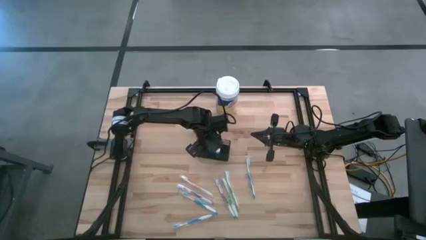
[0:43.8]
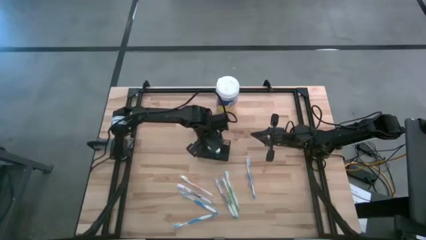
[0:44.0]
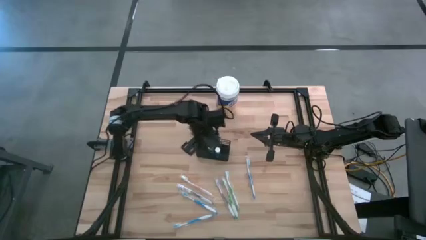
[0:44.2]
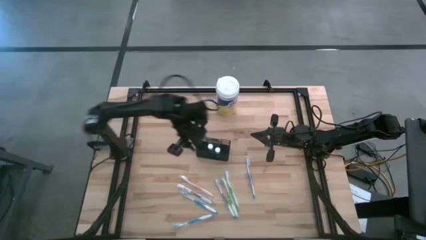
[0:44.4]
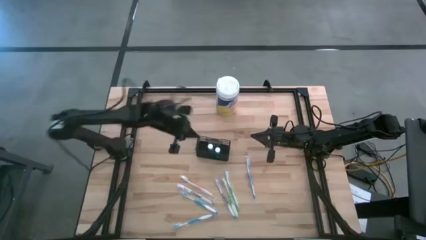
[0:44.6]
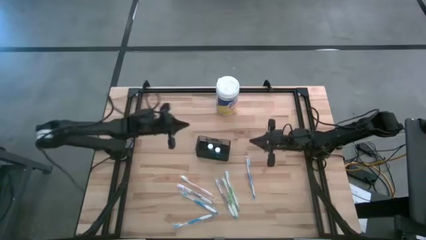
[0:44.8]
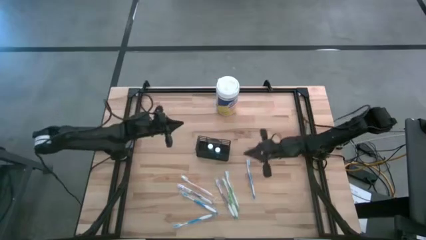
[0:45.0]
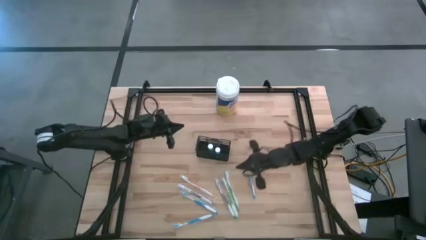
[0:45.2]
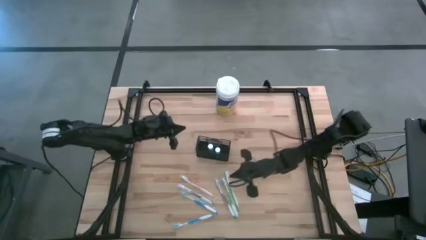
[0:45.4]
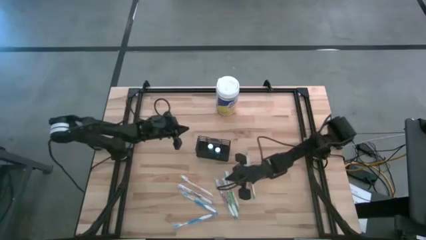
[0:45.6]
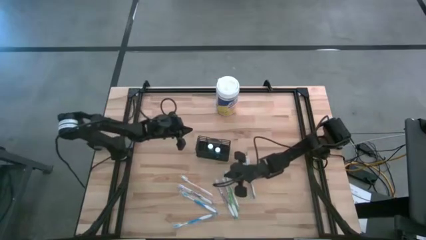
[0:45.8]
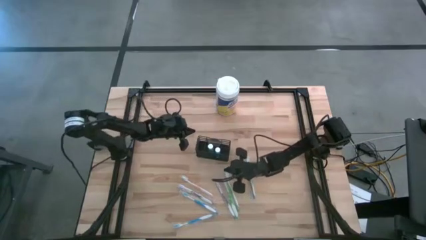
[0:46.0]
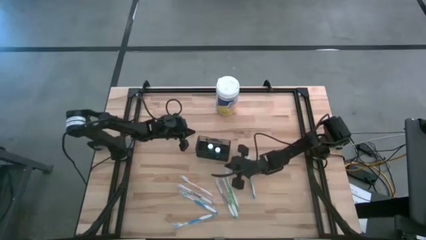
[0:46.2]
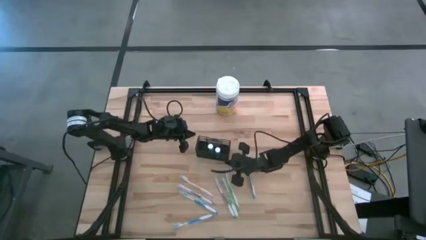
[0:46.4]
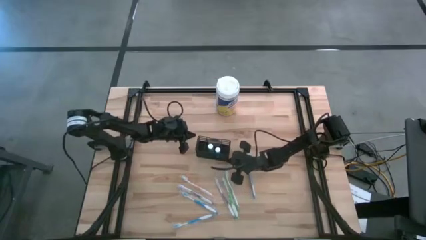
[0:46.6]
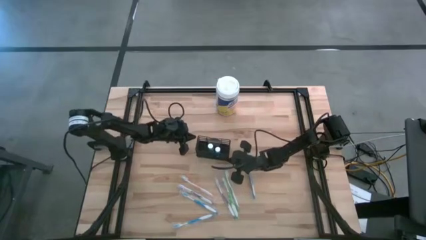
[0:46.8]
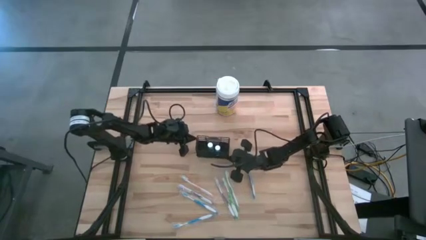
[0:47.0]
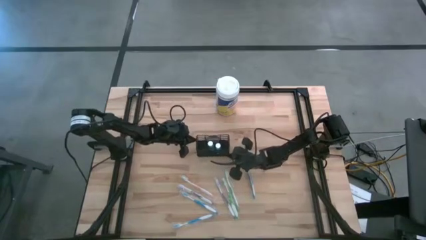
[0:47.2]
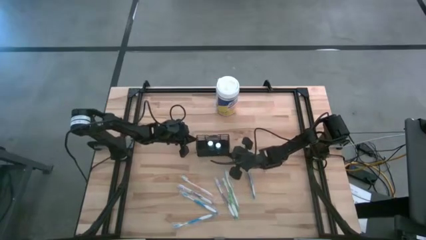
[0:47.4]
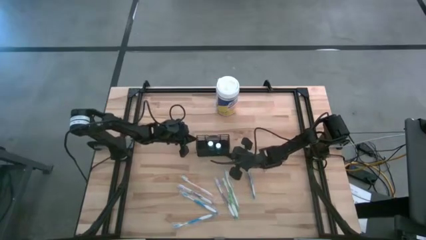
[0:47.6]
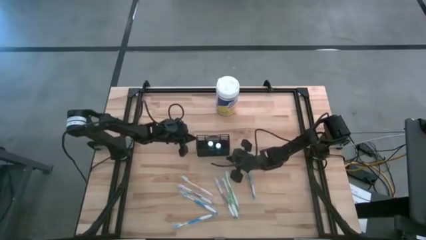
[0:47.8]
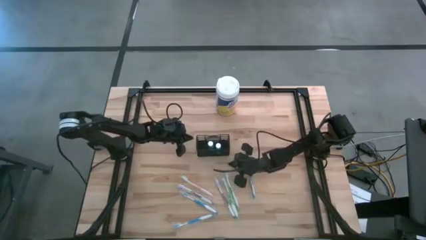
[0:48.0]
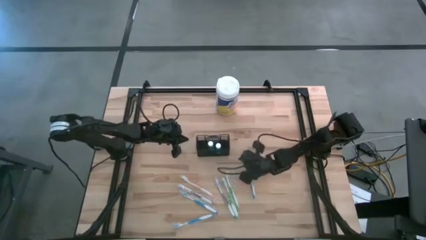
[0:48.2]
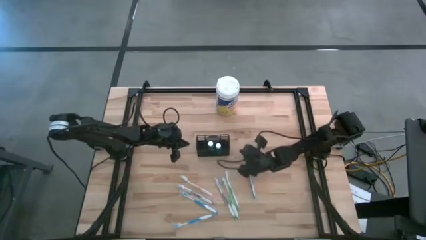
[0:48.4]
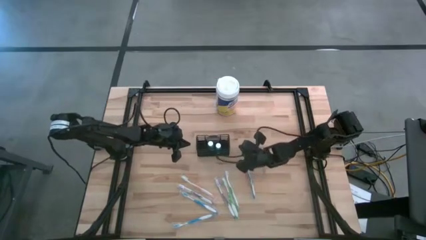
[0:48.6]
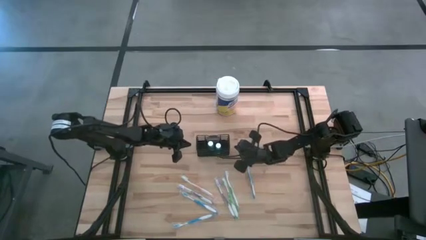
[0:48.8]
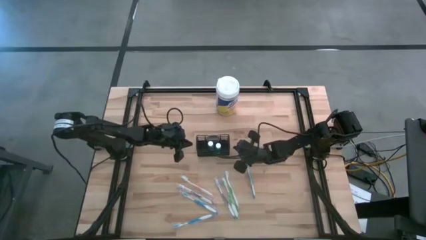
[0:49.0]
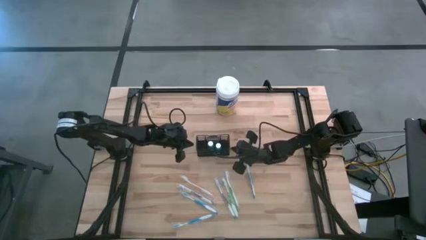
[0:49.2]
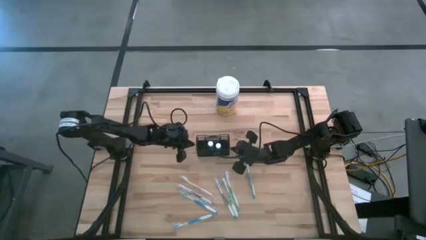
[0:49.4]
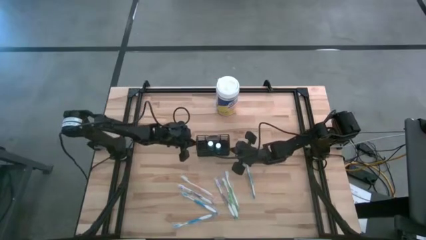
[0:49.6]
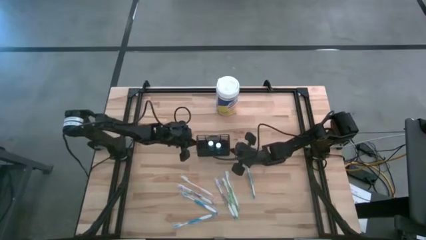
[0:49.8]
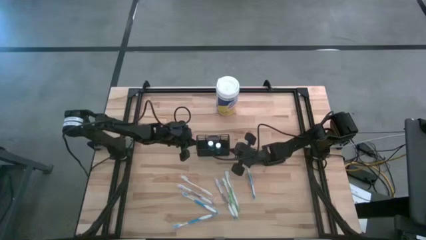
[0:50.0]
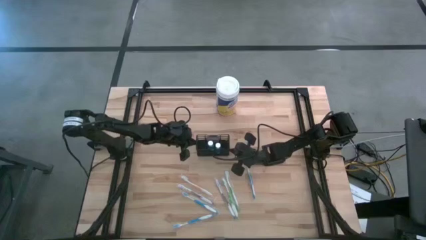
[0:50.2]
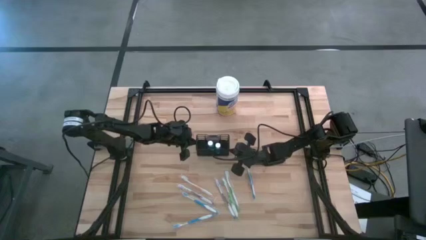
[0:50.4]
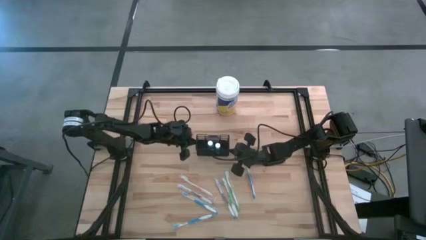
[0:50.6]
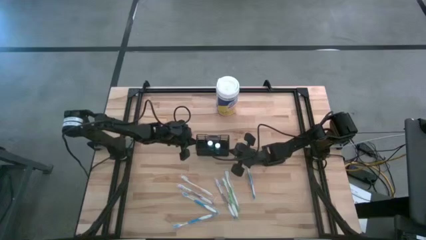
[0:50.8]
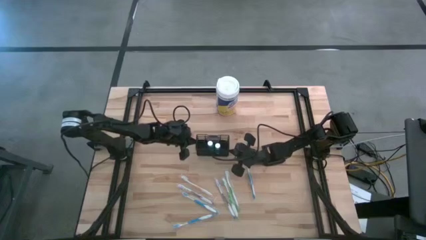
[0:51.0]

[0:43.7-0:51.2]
Task: Pick & Place toothbrushing station
Adjust the black wire organizer

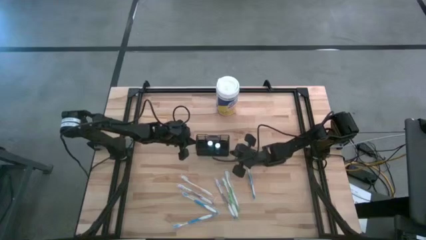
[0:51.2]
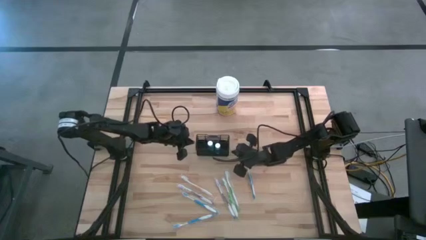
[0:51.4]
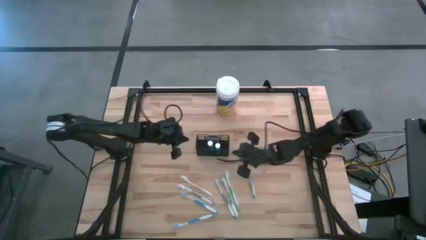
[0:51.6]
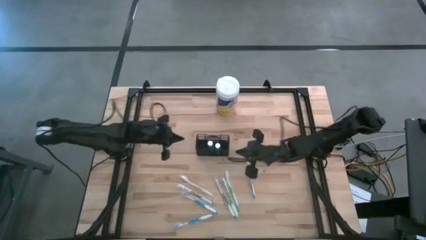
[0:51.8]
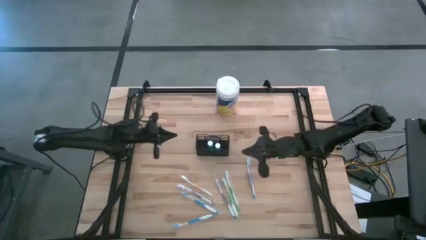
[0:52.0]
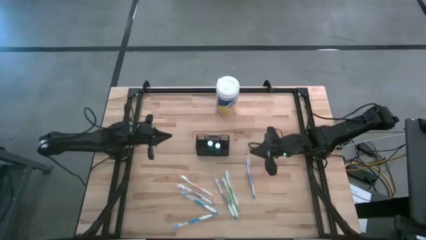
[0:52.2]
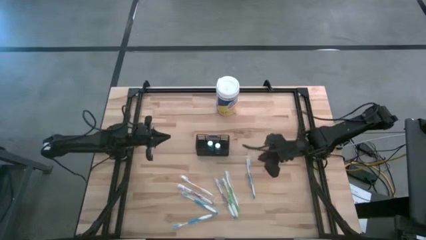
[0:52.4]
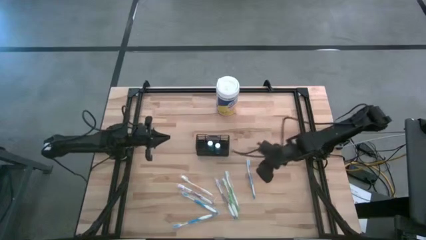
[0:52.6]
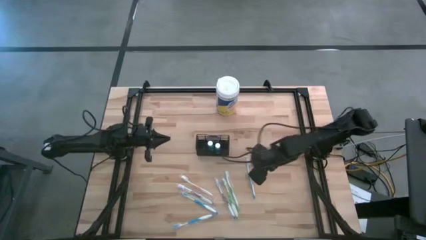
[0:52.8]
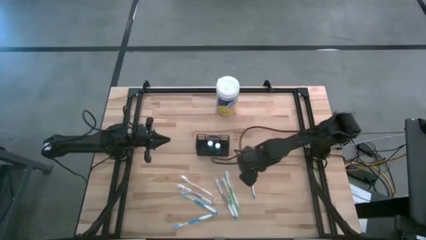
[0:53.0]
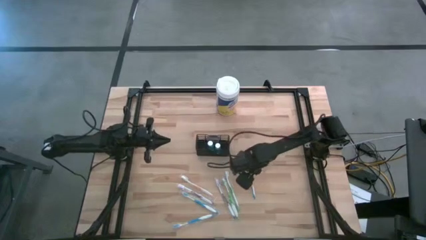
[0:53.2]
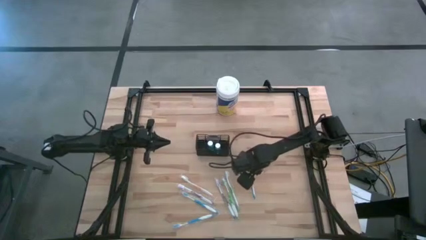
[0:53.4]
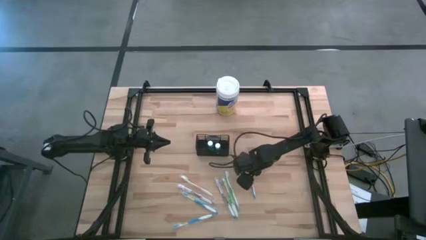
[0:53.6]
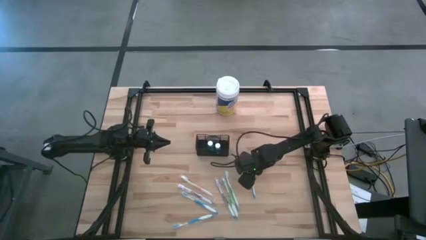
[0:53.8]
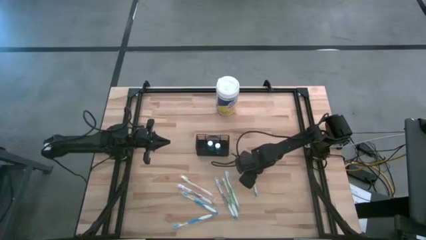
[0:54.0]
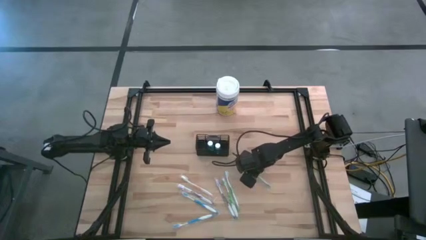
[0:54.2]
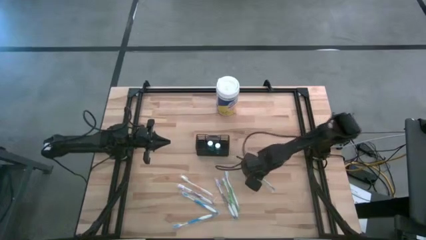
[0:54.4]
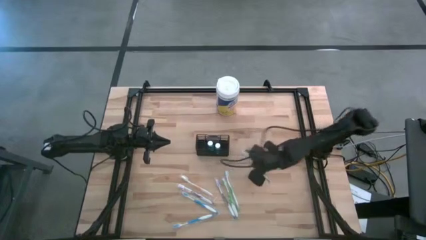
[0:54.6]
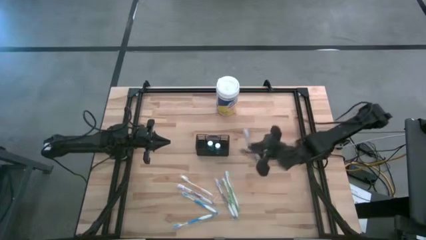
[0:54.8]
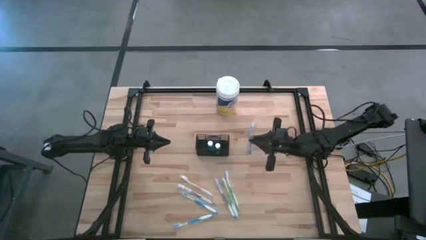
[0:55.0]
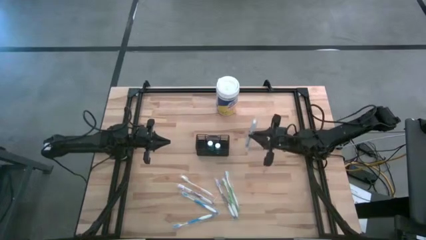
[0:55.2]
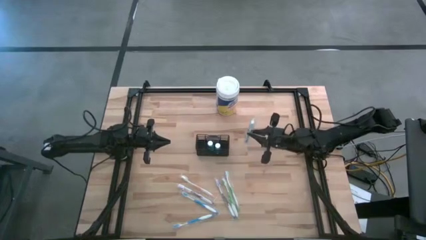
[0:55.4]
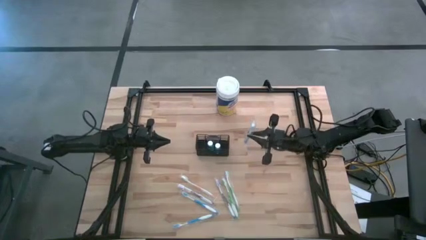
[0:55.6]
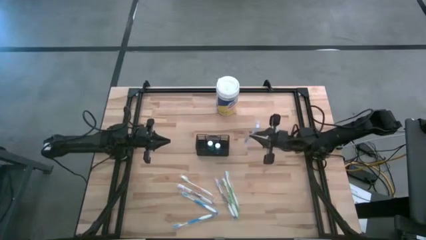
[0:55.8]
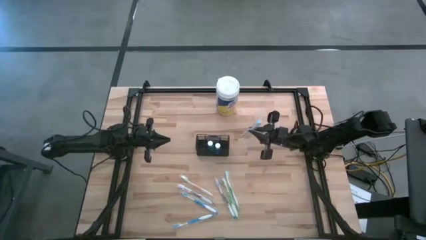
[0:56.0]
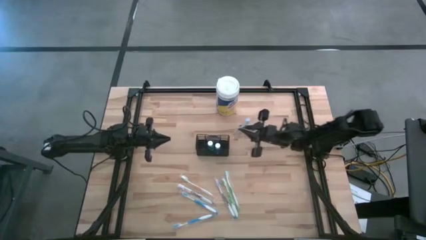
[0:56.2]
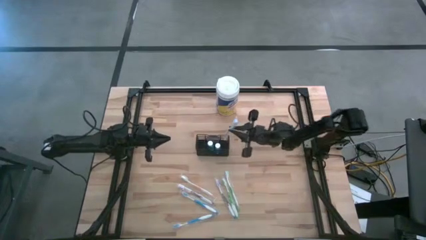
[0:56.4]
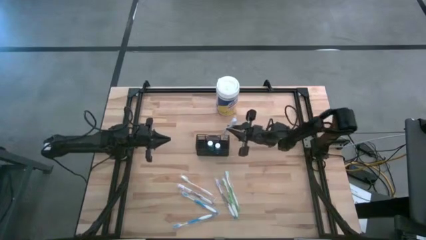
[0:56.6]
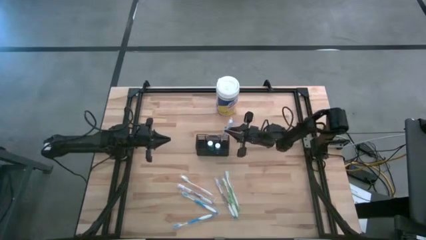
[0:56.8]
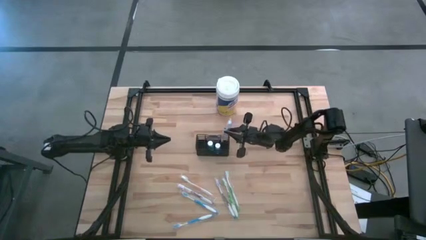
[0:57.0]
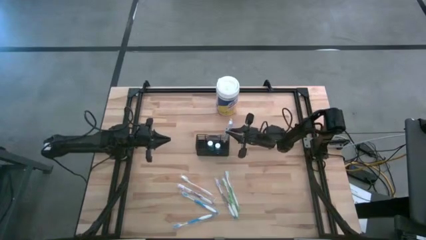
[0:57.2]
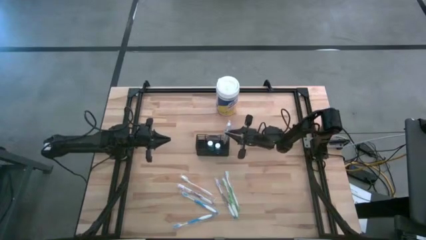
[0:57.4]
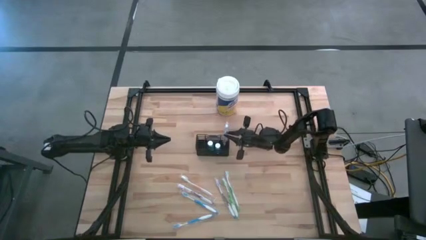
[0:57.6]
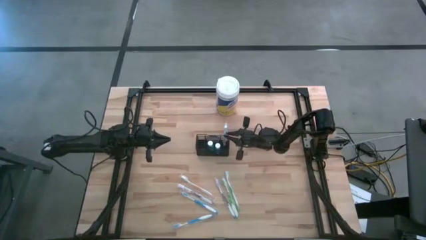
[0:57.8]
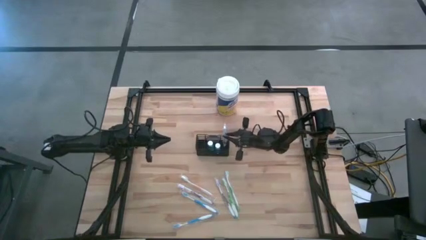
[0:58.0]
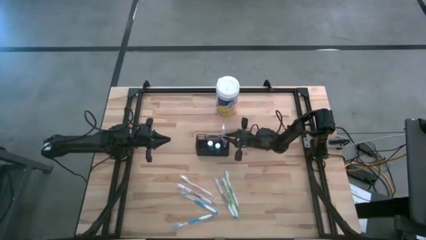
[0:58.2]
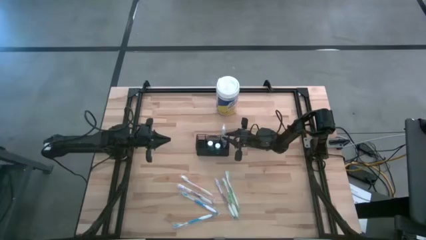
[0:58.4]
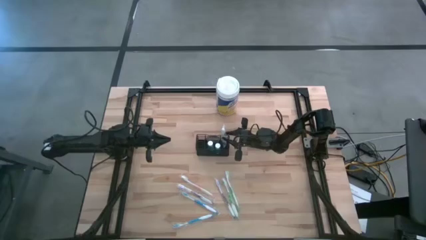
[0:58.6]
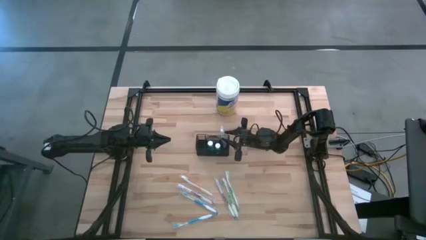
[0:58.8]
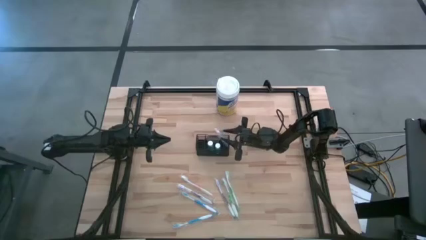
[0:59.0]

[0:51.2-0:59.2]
Put the top right blue toothbrush into the black wire organizer
